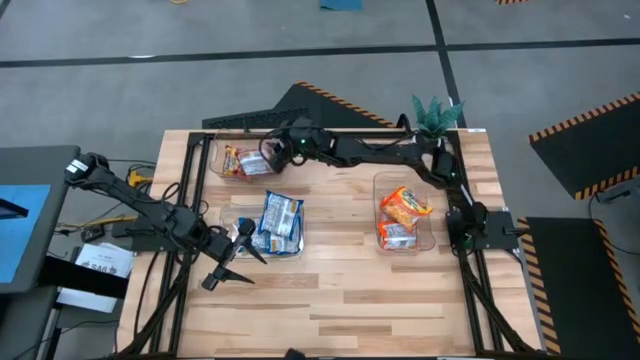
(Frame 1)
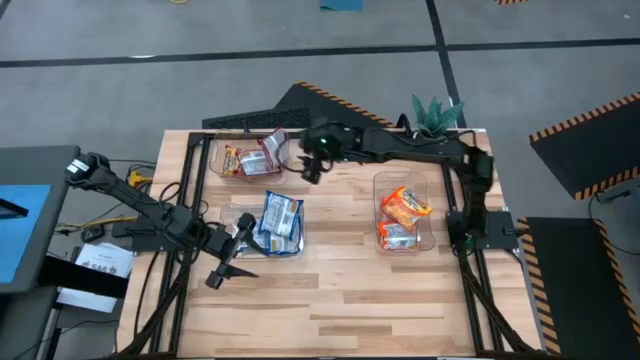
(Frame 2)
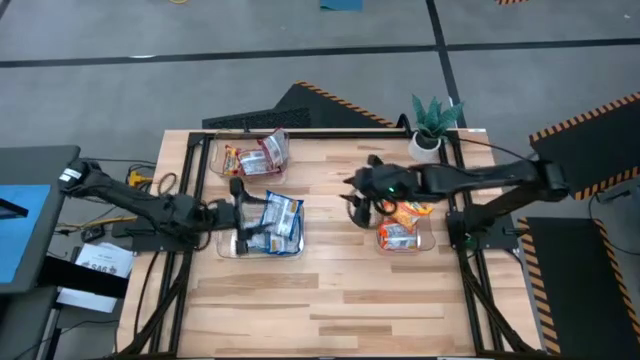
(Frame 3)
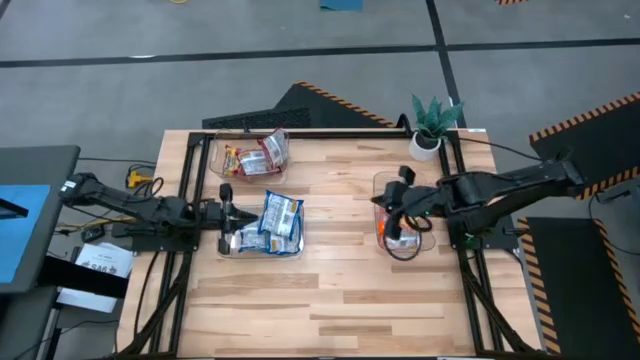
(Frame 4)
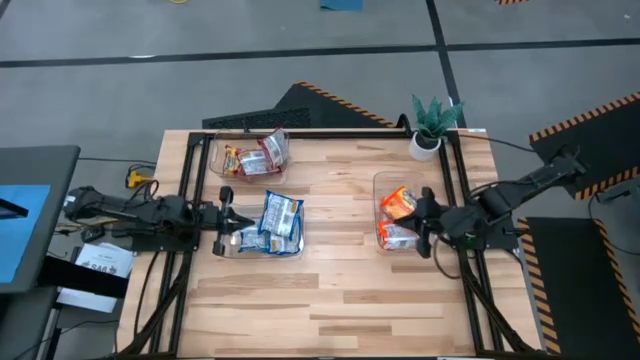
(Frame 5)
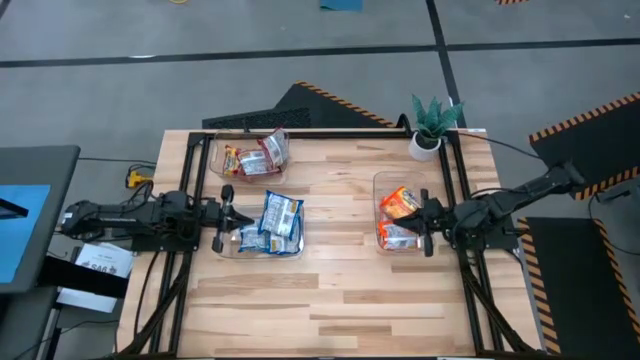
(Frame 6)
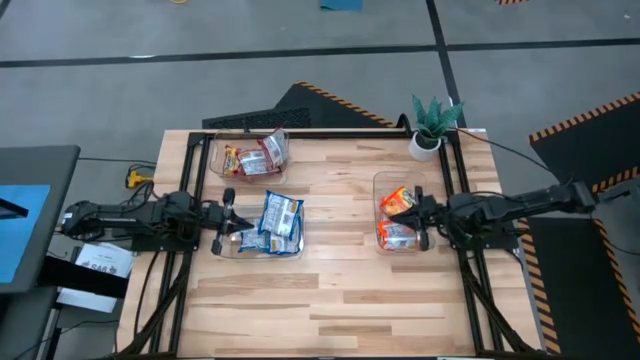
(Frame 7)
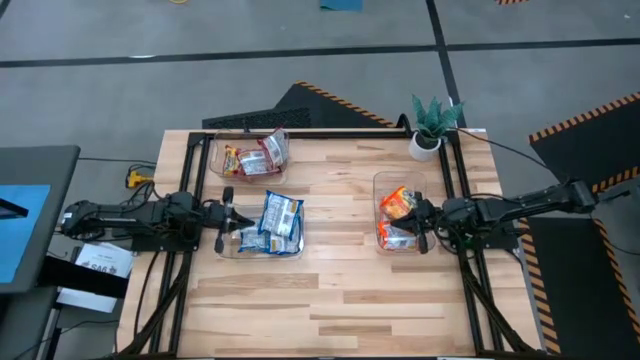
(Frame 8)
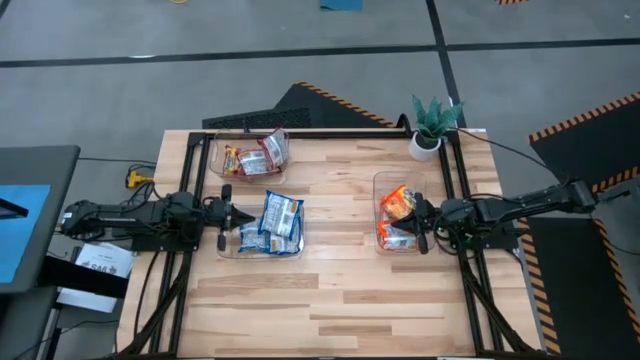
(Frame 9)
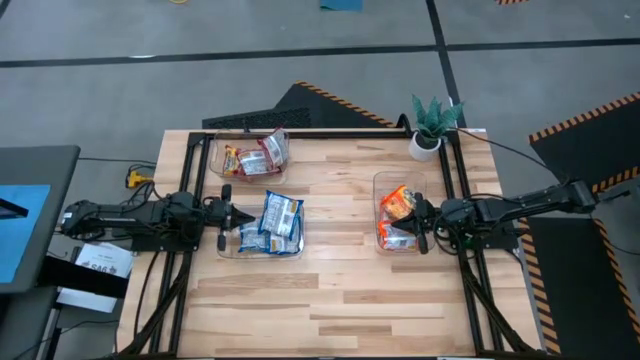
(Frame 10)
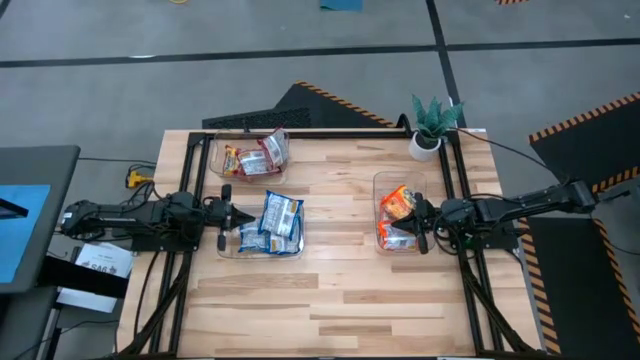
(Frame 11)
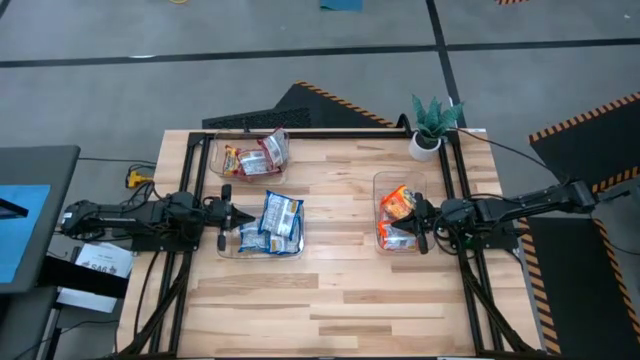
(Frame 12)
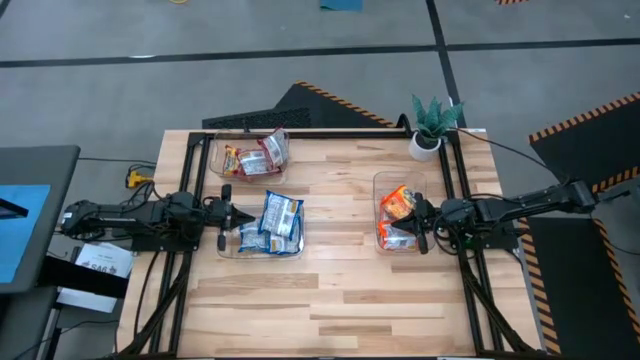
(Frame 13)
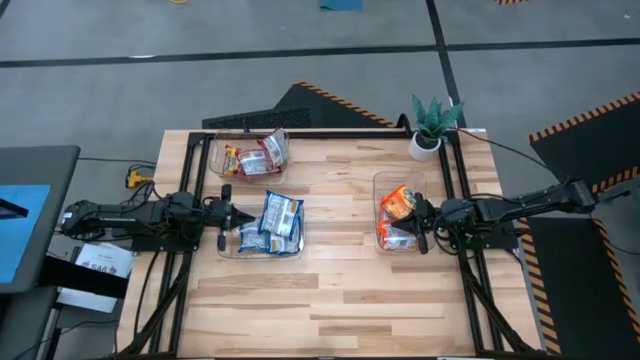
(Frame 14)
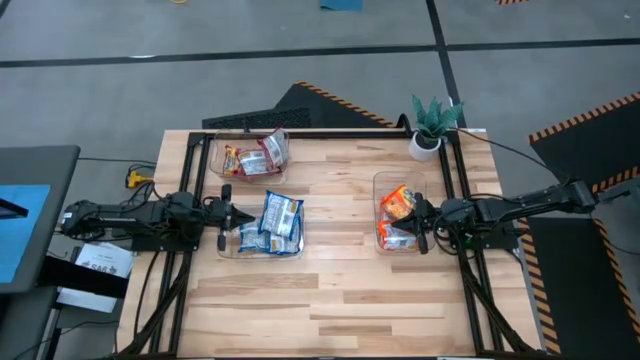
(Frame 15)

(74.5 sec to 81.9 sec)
Task: Sort Maruchan noodles
Return to Home Position

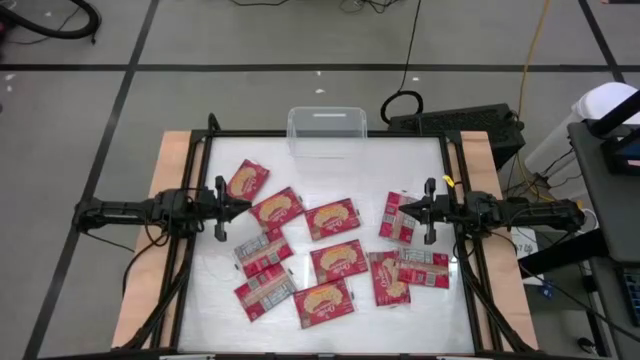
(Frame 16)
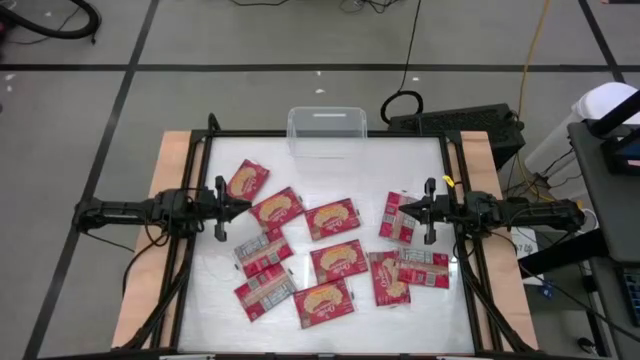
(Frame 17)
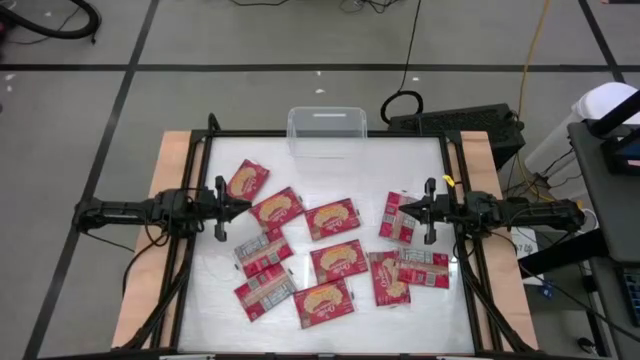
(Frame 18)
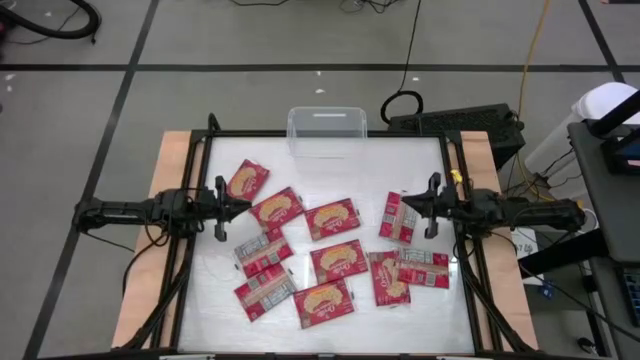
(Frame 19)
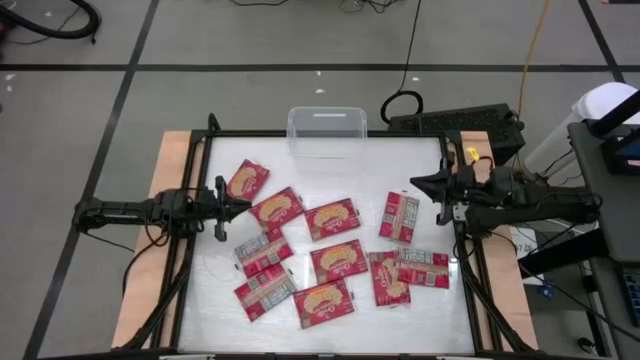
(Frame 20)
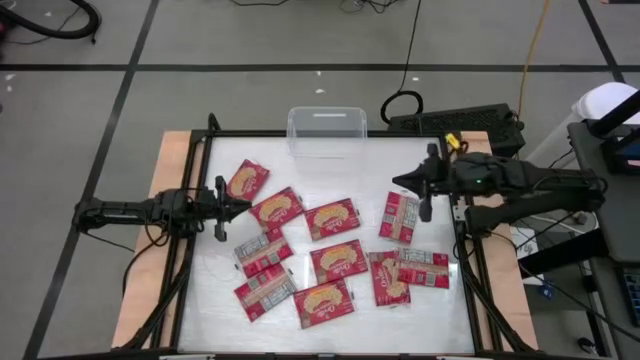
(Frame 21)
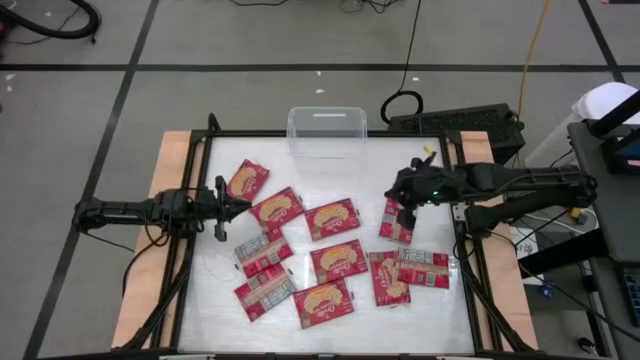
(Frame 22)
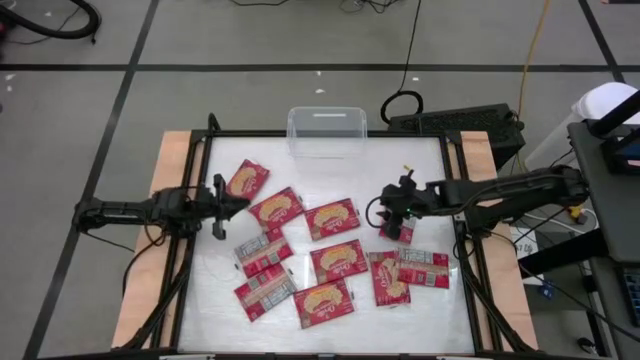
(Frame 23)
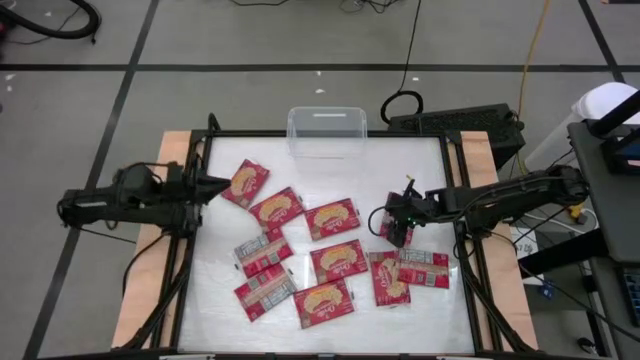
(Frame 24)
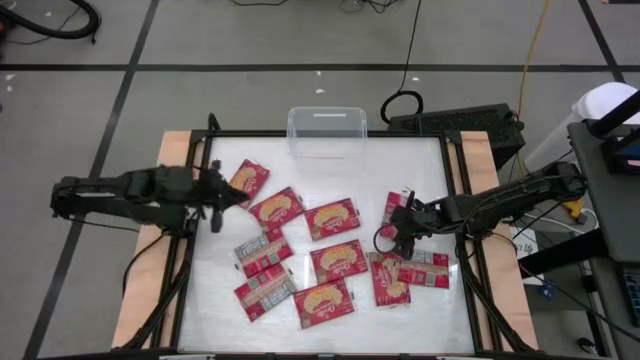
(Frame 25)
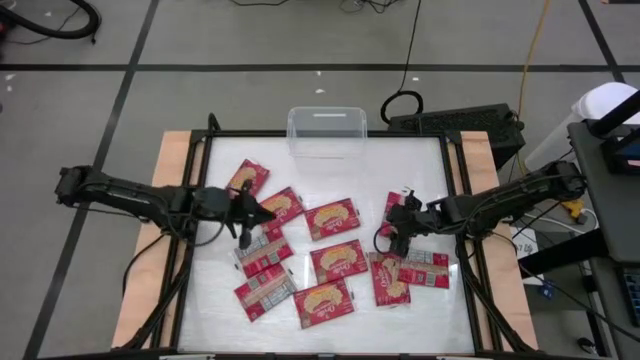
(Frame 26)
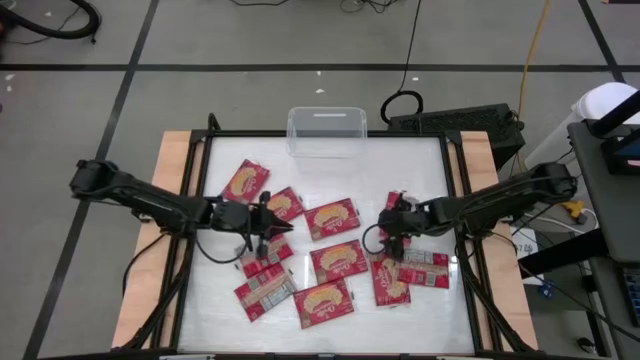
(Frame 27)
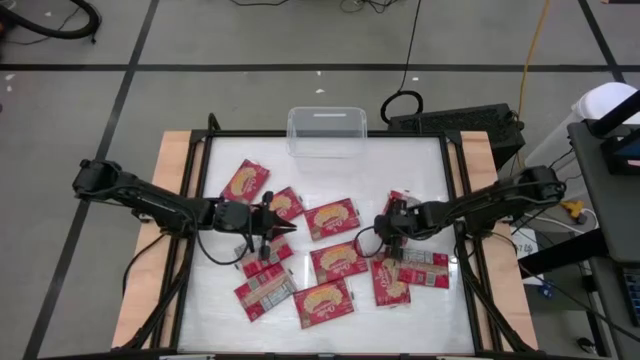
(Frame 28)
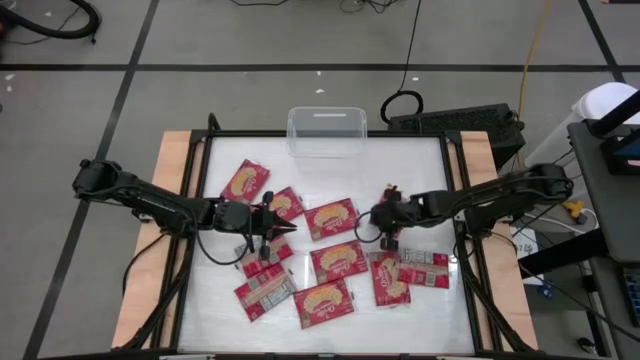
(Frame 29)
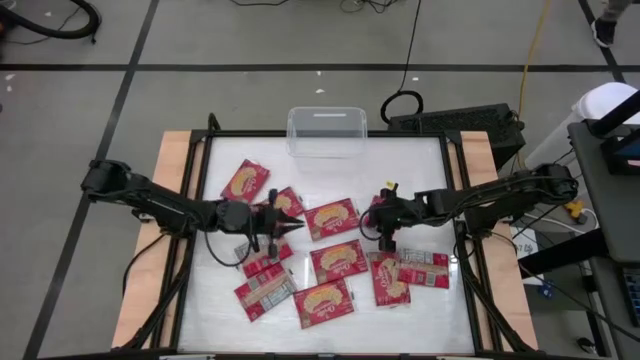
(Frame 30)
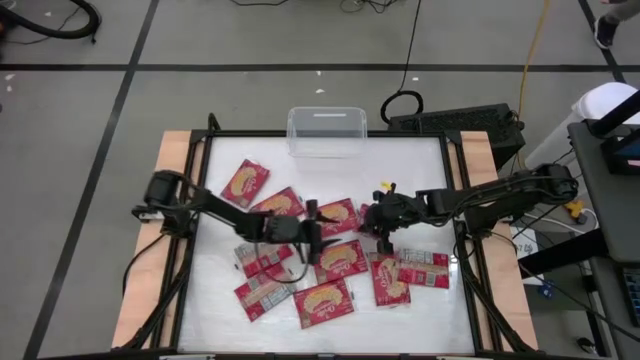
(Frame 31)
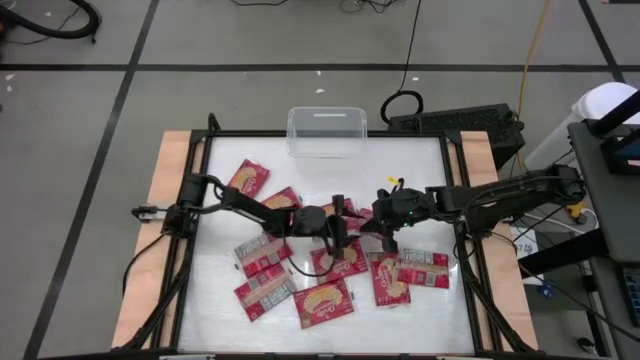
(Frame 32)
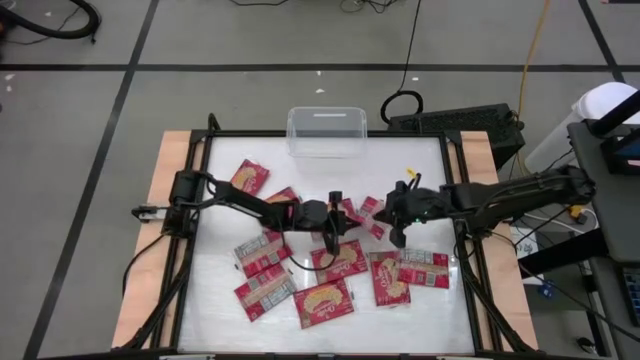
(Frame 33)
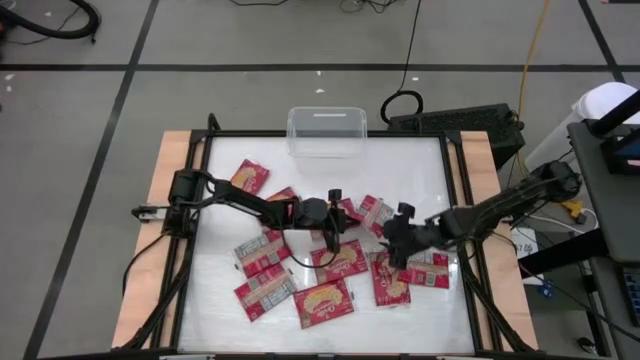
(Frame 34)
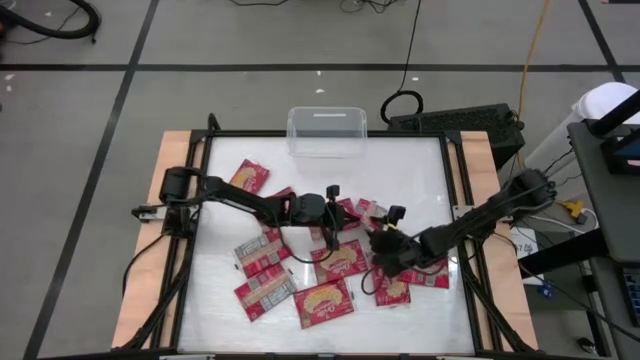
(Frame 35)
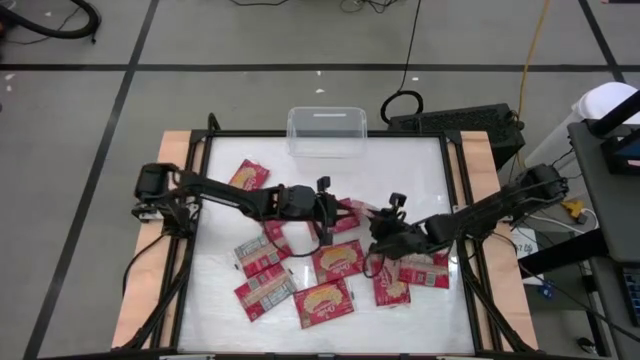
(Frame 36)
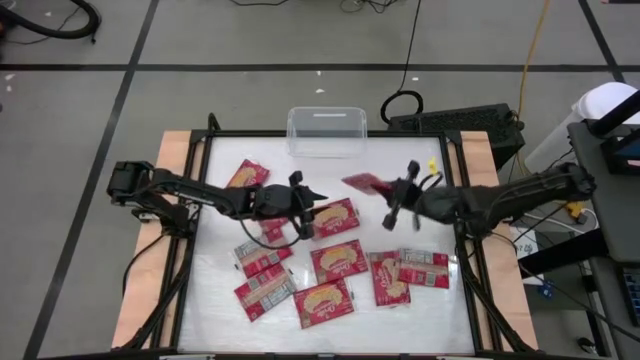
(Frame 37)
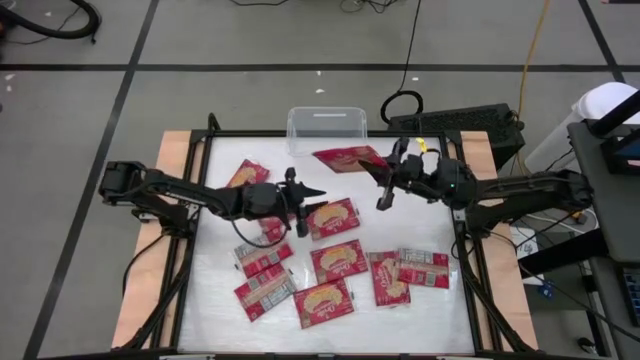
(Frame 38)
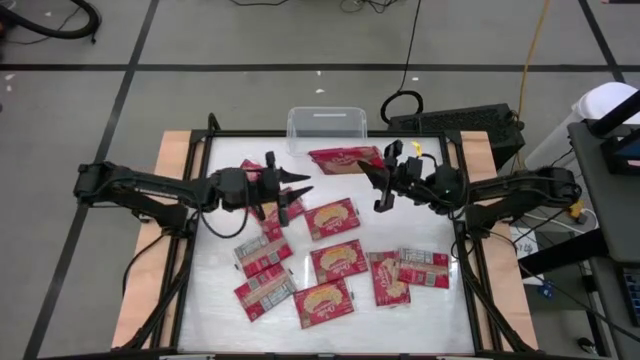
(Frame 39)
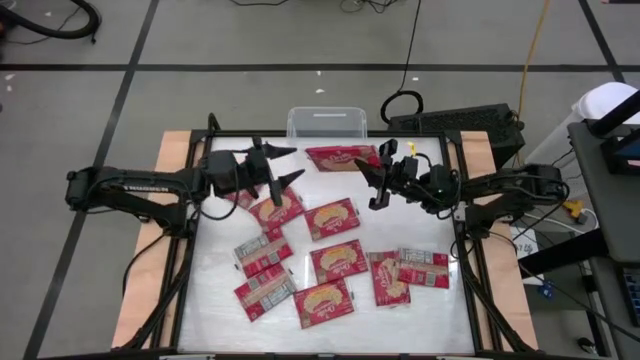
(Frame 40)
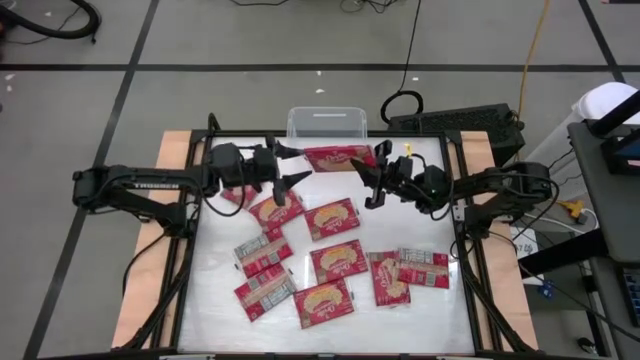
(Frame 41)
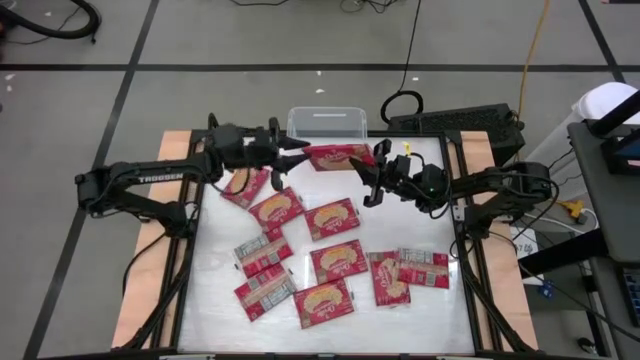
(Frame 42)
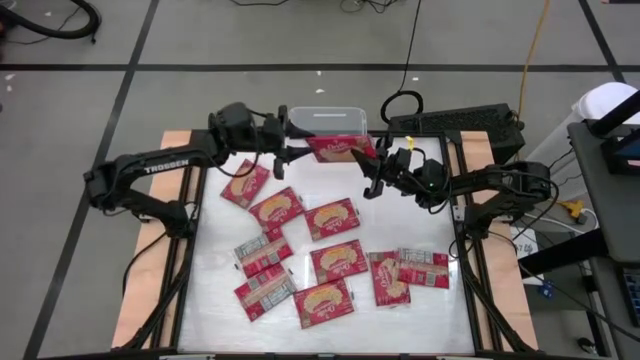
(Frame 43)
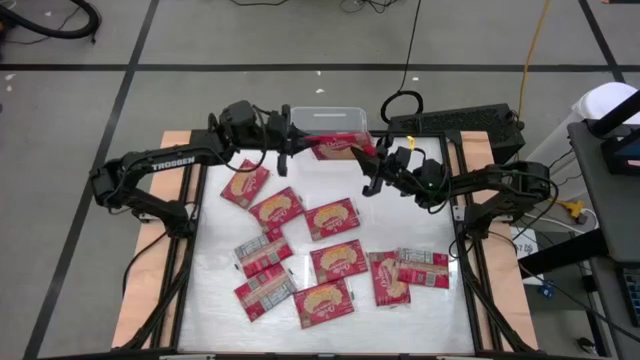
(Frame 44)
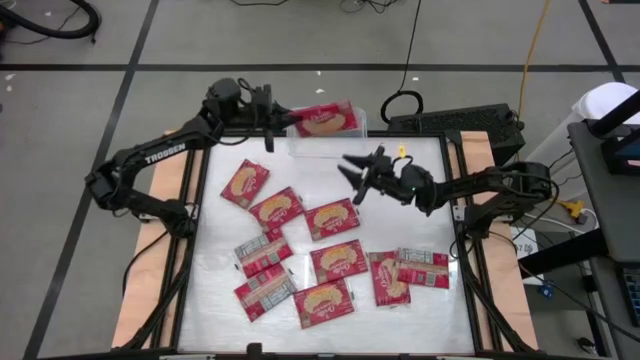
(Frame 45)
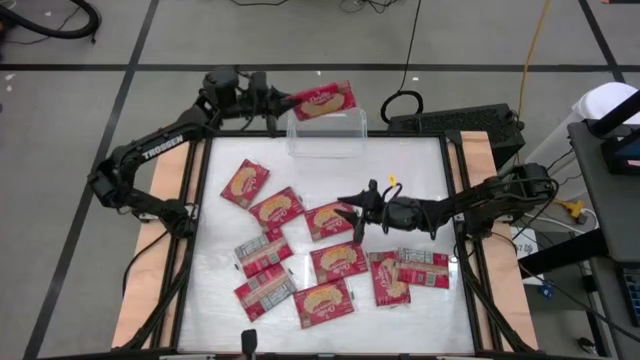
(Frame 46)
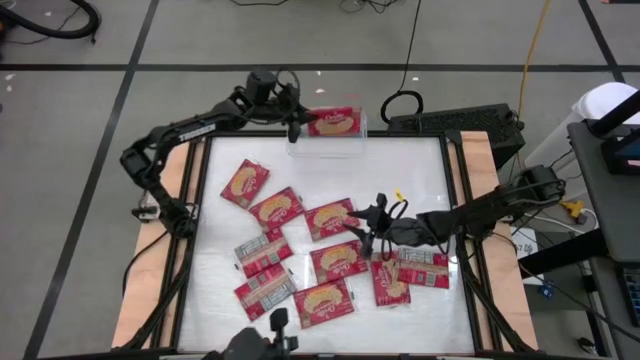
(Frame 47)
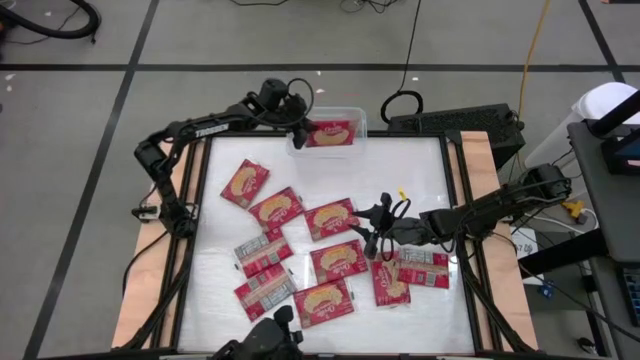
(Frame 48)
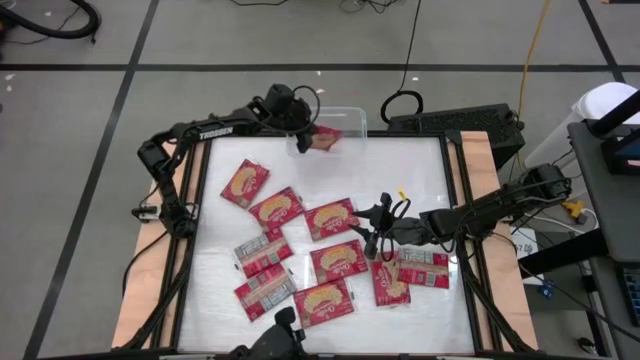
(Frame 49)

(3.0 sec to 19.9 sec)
Task: Sort popcorn bags into baskets
Put the popcorn bag into the transparent bin
